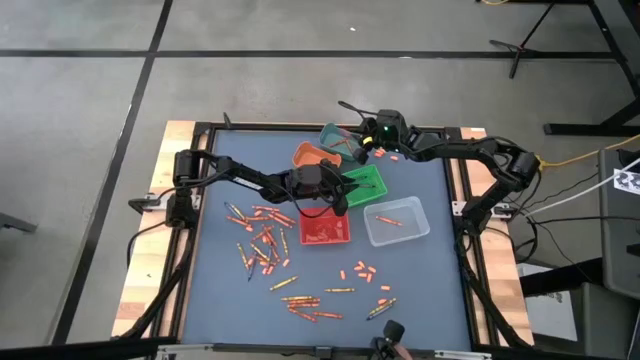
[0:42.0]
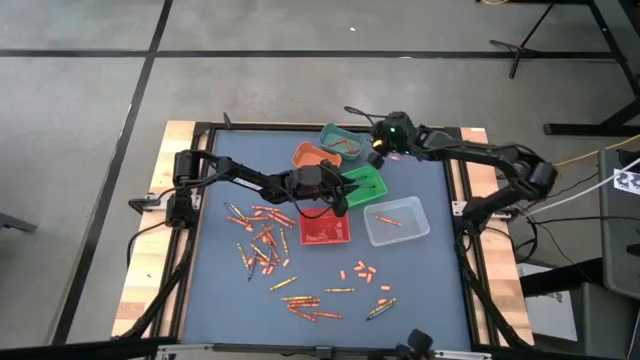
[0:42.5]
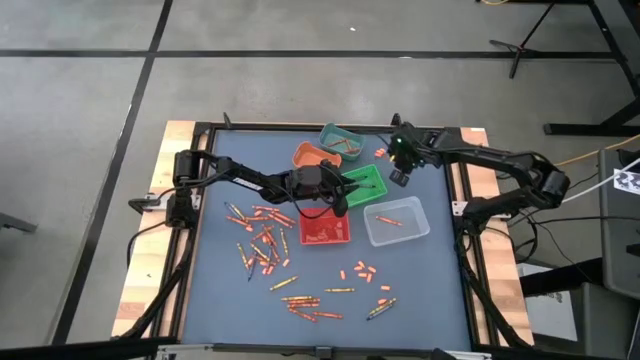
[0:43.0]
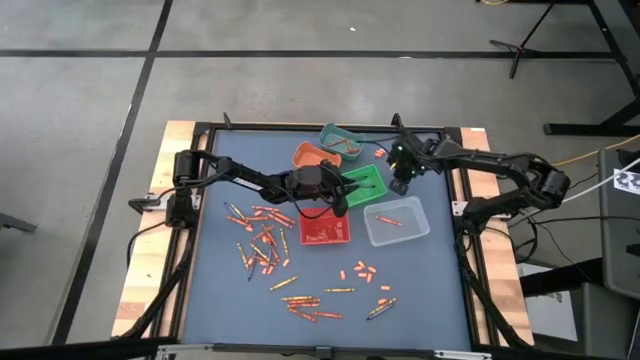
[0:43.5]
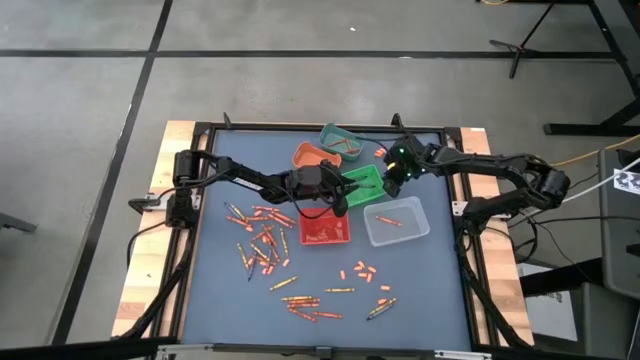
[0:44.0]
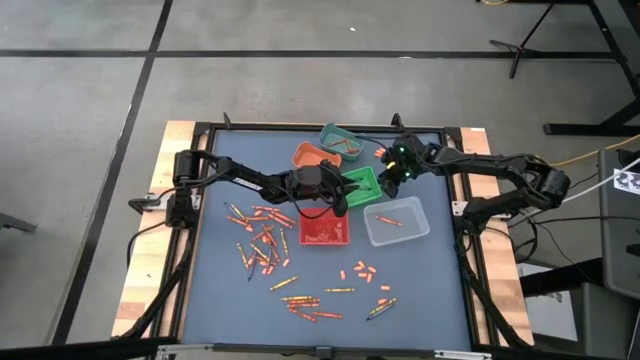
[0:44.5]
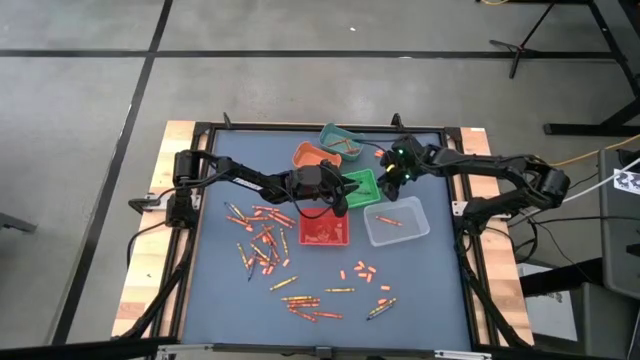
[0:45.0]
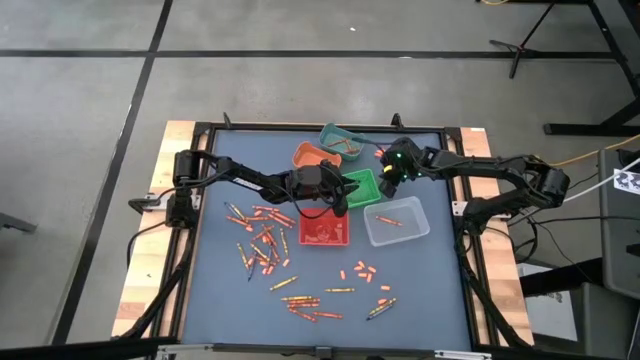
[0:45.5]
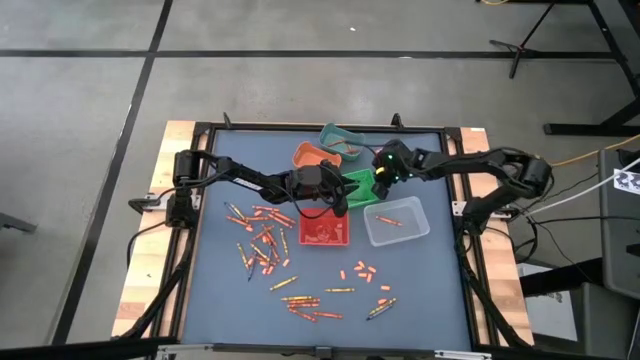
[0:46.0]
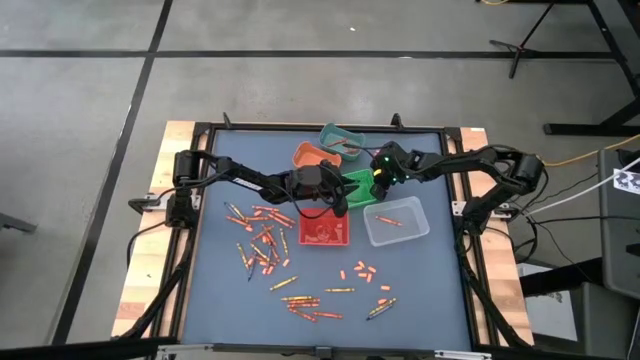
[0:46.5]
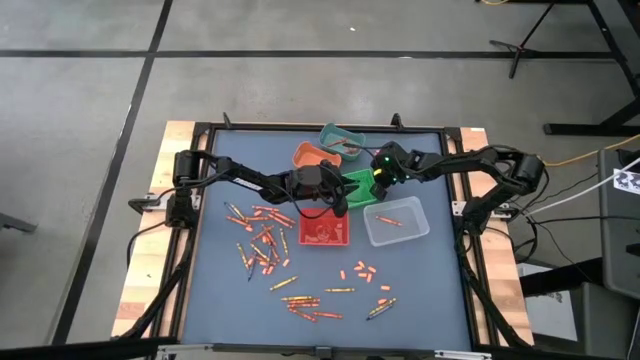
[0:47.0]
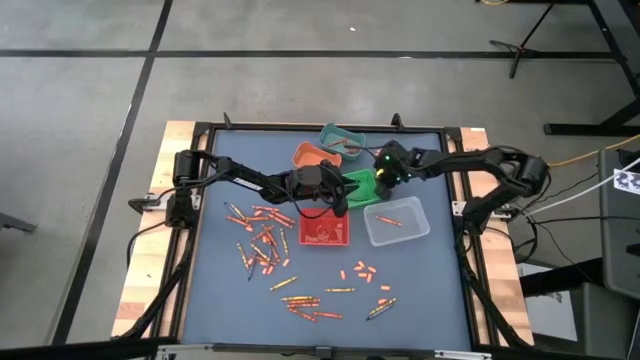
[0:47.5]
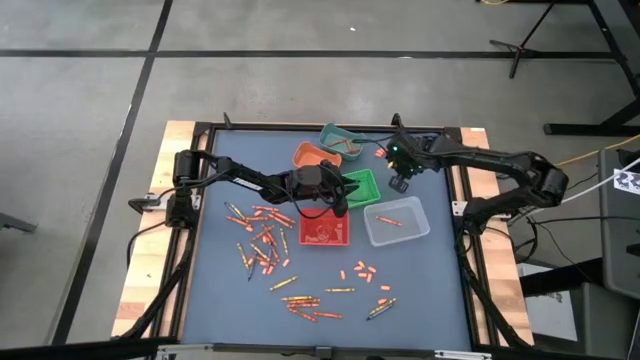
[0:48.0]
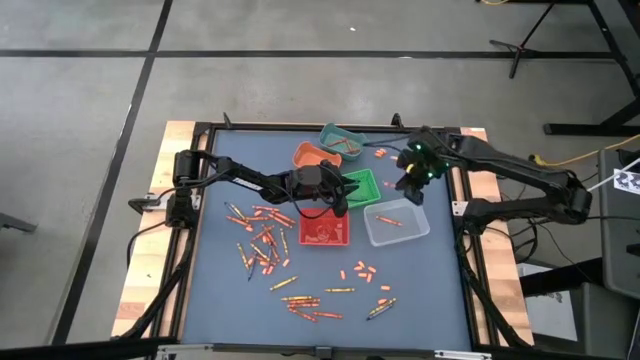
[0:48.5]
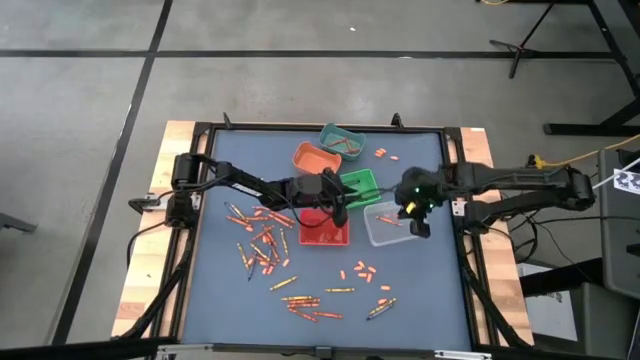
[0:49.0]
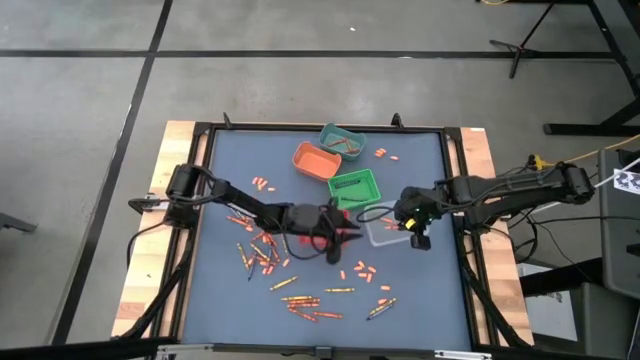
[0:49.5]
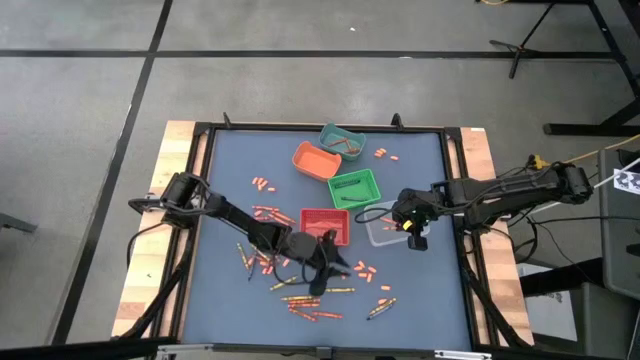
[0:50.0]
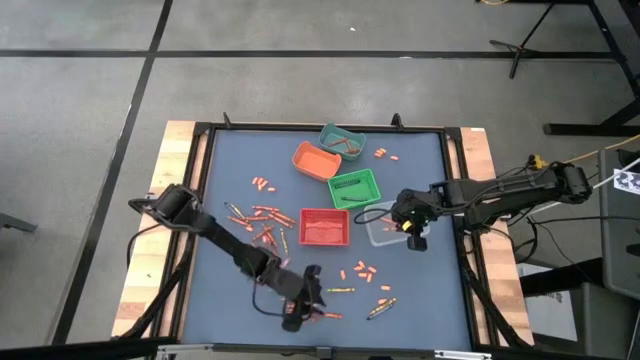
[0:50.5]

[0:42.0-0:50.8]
Task: Sort crayons
Put the light orange crayon into the transparent bin

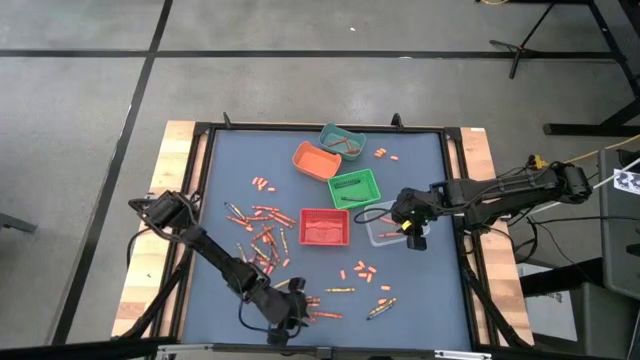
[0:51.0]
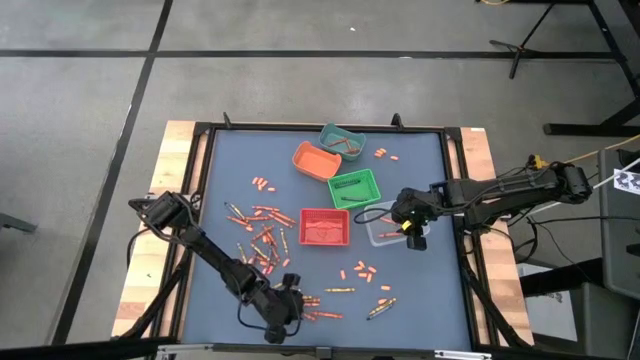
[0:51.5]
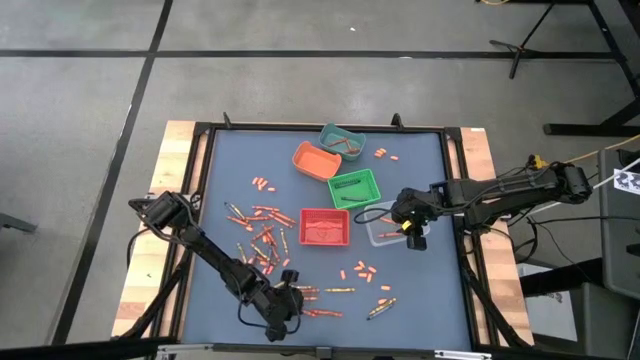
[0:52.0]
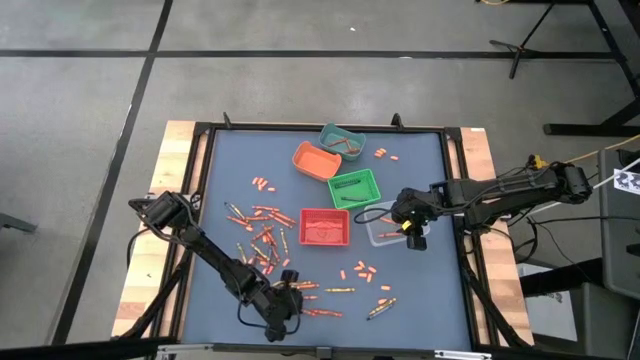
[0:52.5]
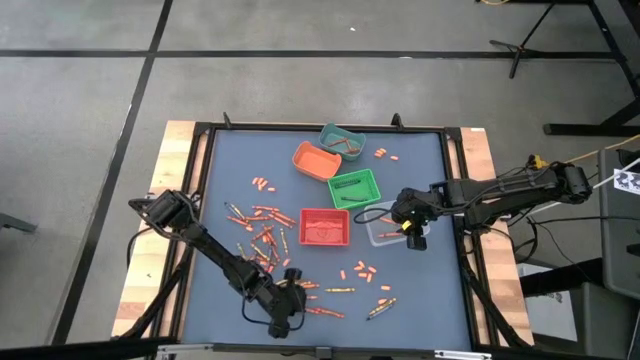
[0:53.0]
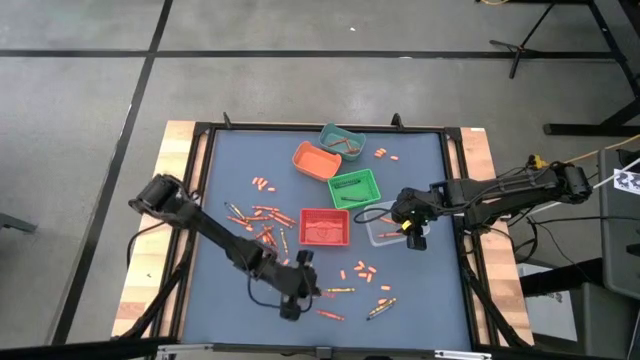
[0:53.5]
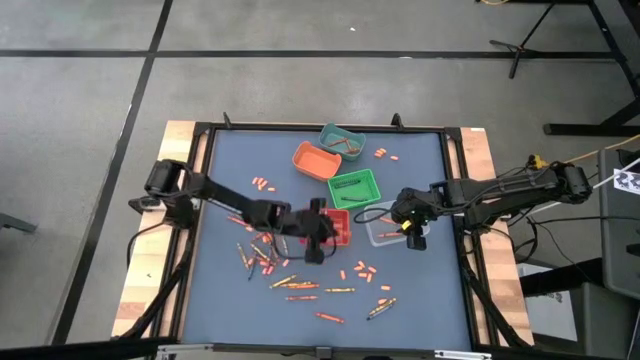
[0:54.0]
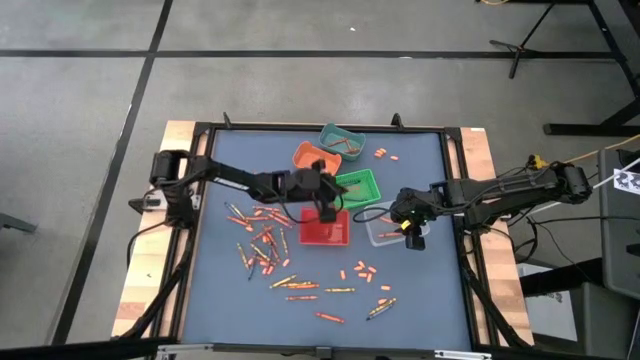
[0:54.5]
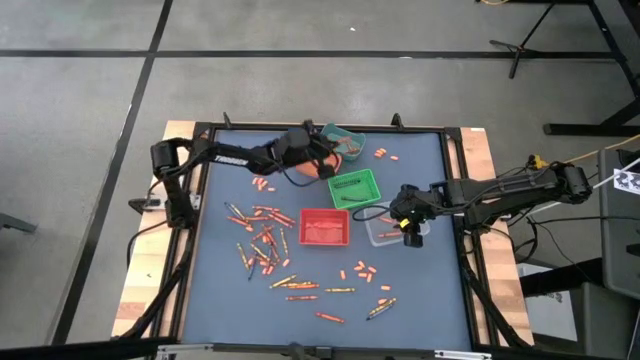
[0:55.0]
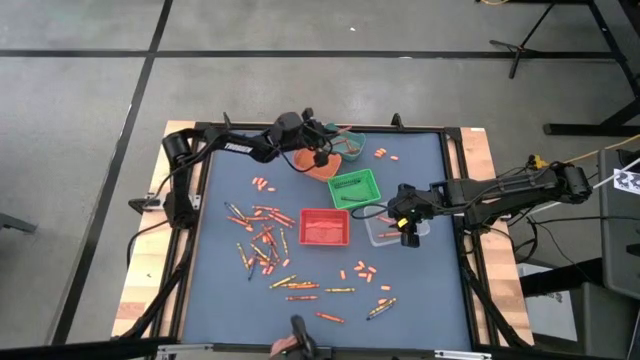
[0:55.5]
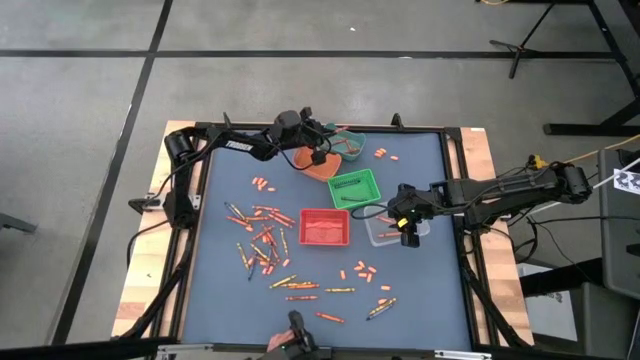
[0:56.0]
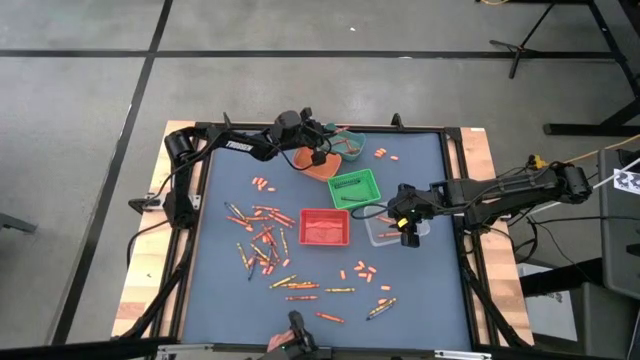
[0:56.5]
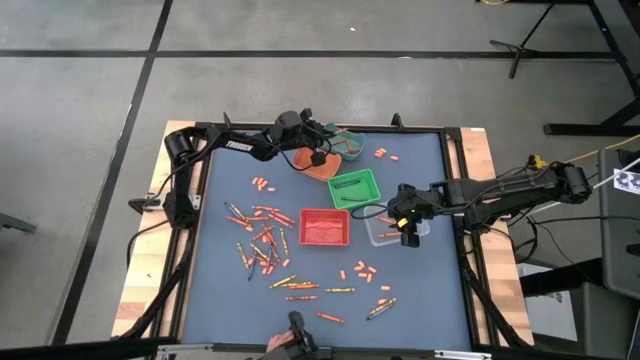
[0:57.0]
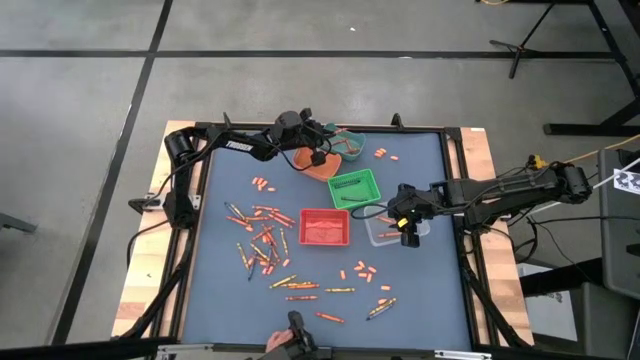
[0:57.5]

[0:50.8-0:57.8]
Put the red orange crayon into the blue bin

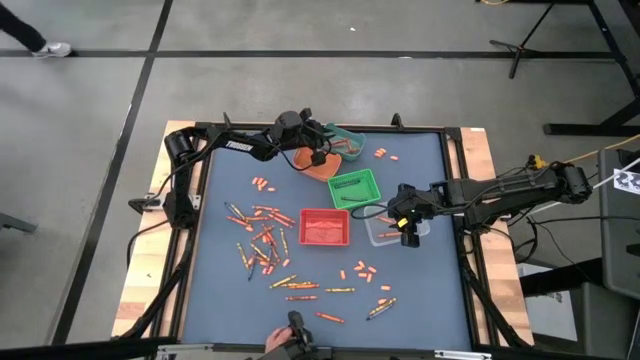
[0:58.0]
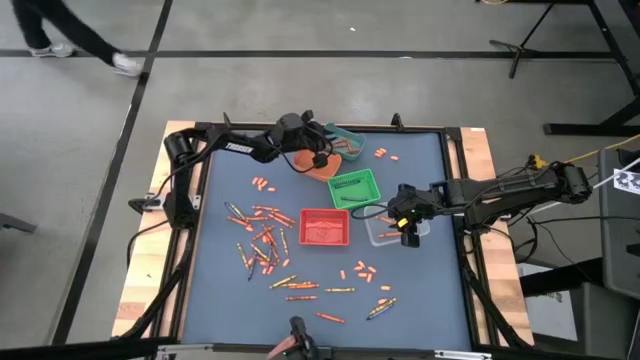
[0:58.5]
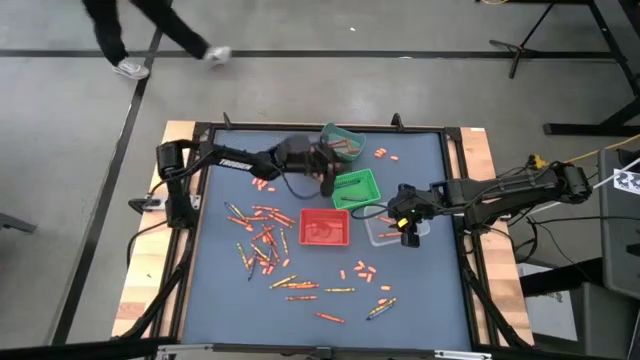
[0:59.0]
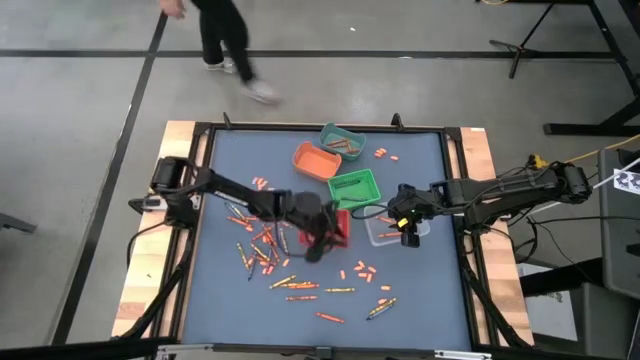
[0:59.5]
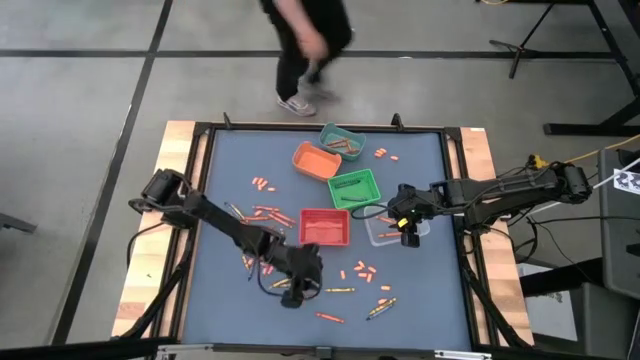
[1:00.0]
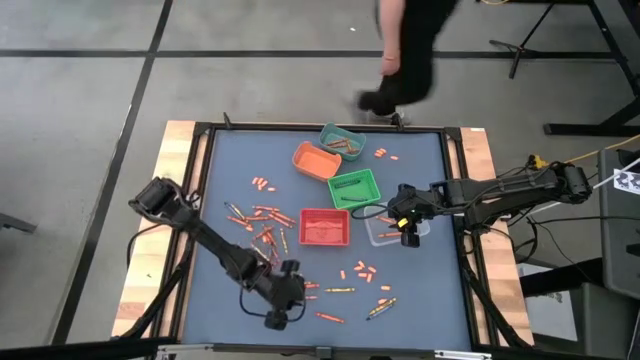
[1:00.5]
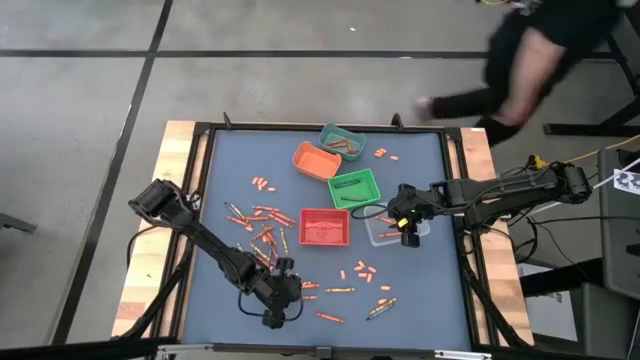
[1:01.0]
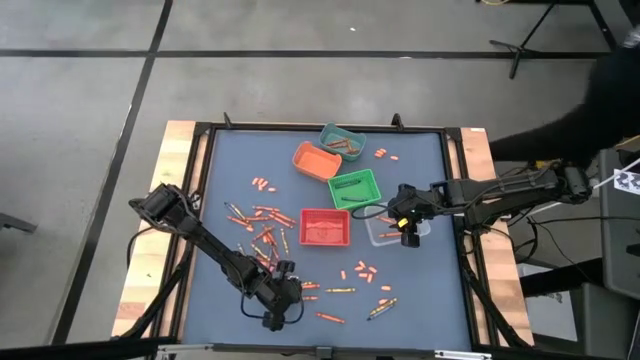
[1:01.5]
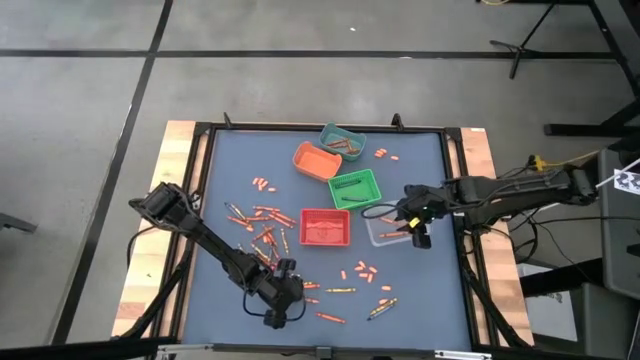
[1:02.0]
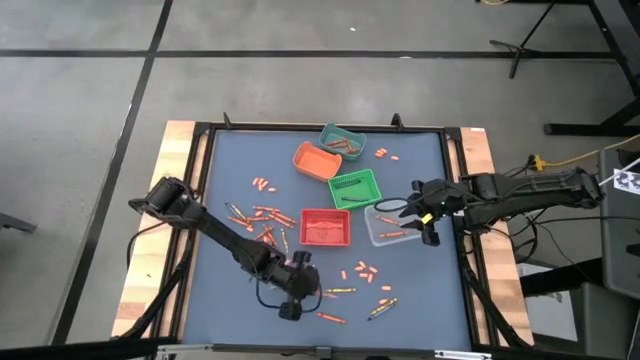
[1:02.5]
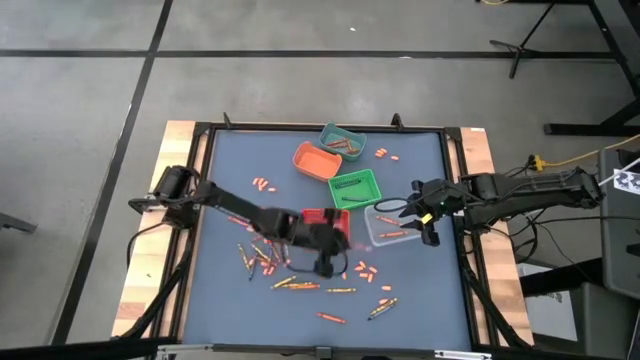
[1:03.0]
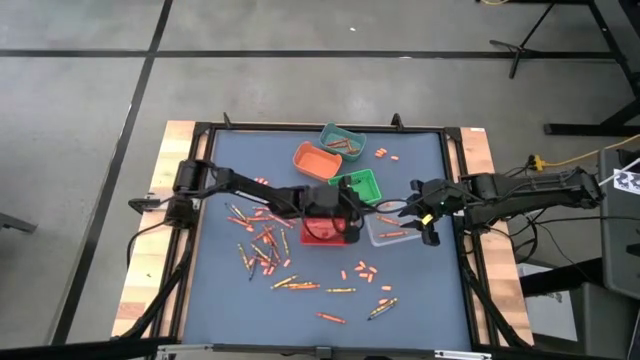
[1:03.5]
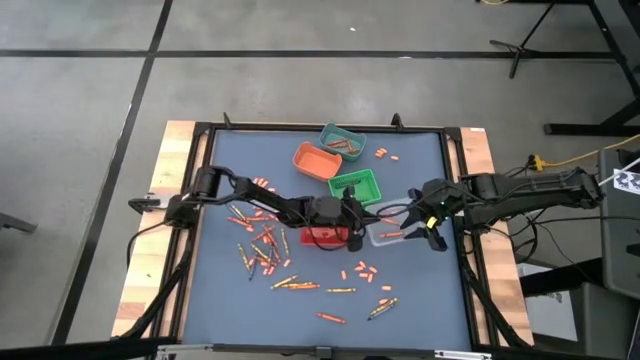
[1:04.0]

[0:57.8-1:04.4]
Put the light orange crayon into the transparent bin
